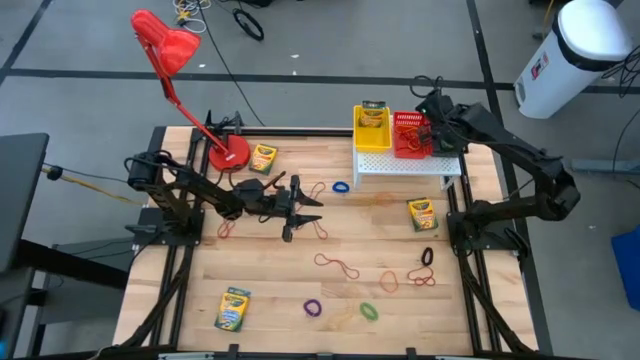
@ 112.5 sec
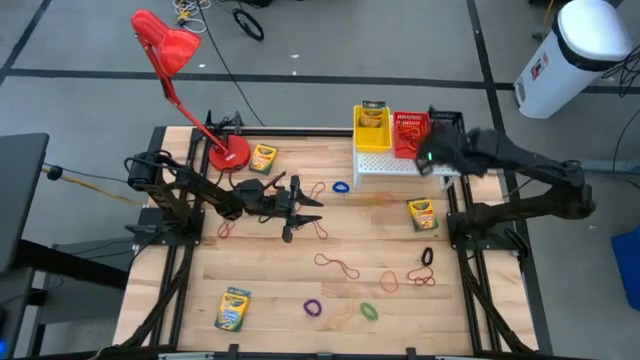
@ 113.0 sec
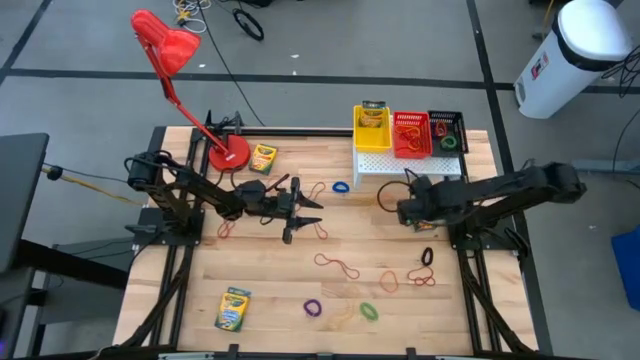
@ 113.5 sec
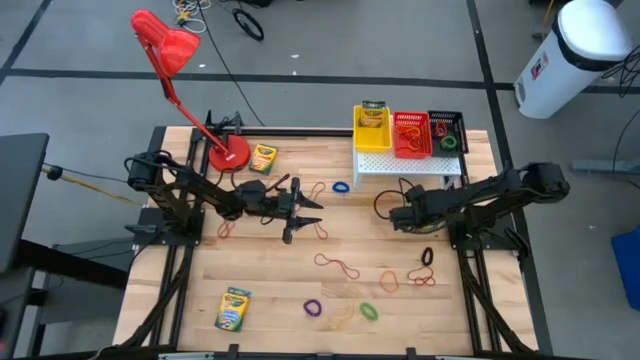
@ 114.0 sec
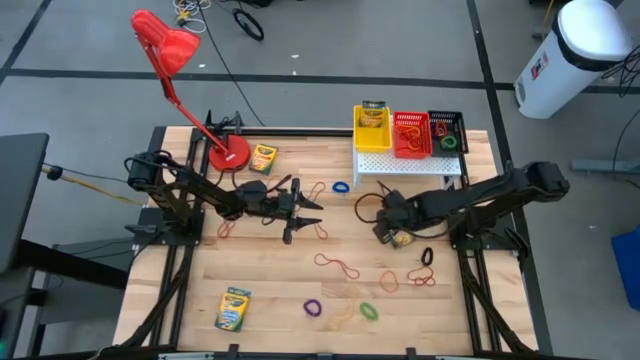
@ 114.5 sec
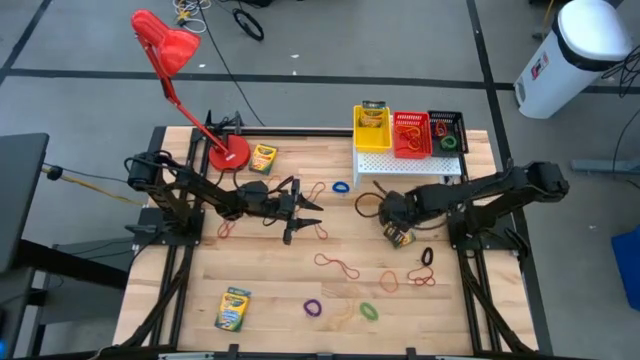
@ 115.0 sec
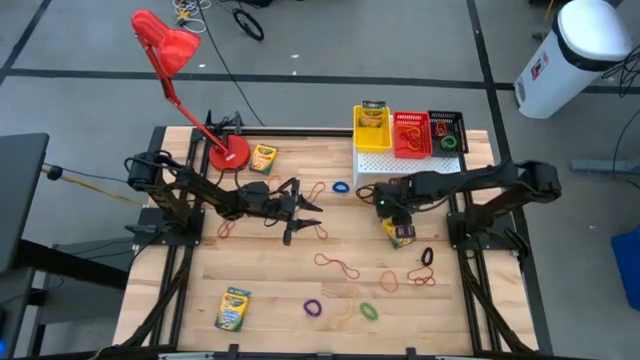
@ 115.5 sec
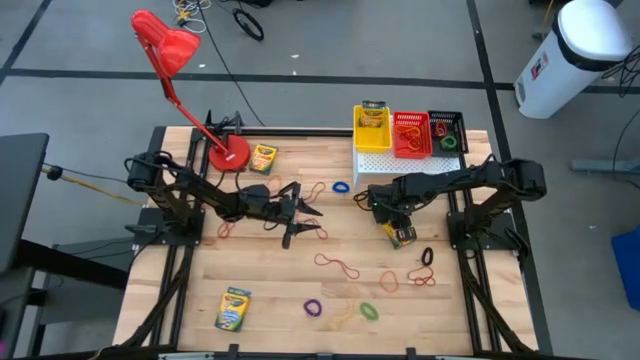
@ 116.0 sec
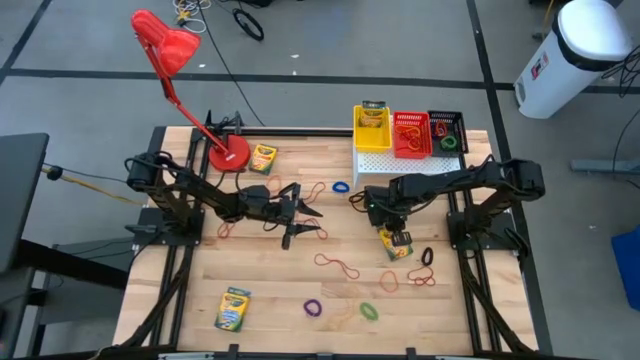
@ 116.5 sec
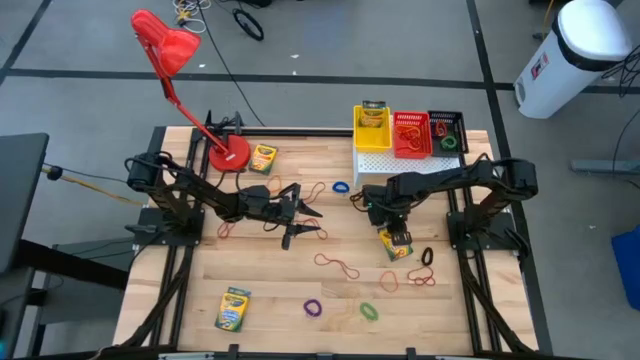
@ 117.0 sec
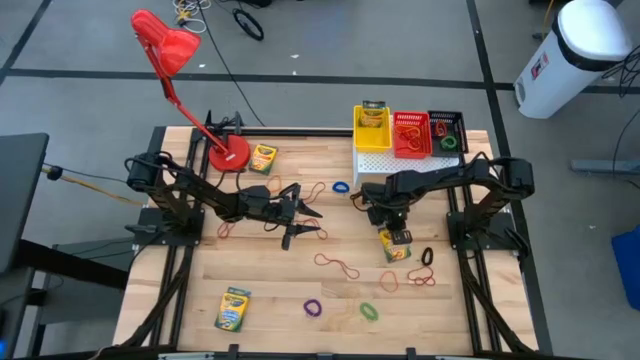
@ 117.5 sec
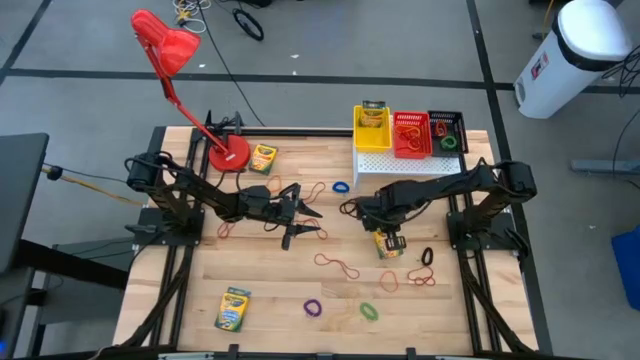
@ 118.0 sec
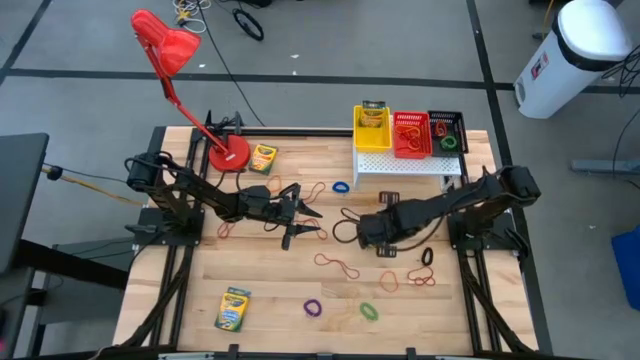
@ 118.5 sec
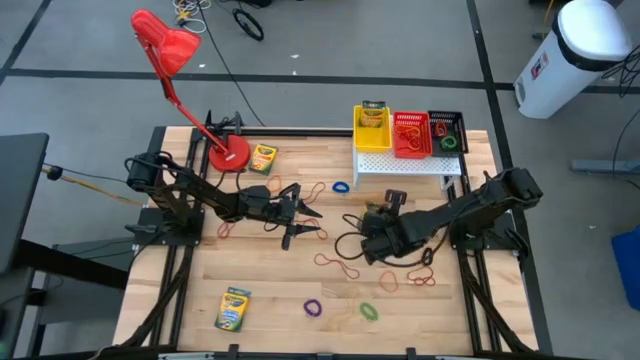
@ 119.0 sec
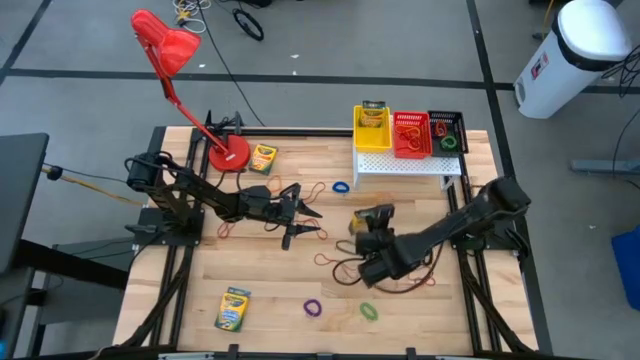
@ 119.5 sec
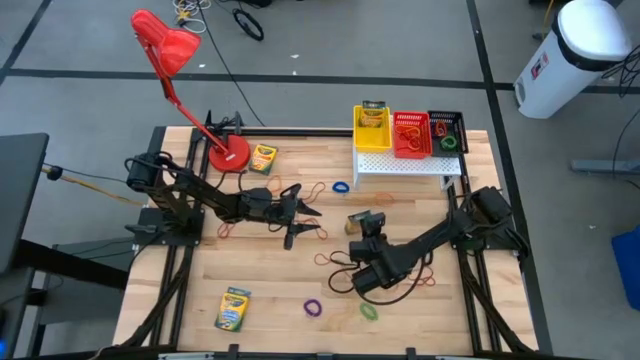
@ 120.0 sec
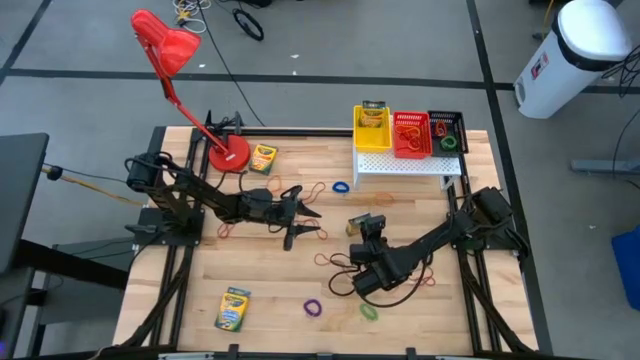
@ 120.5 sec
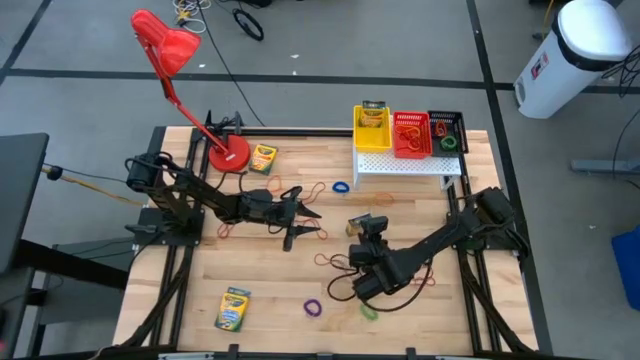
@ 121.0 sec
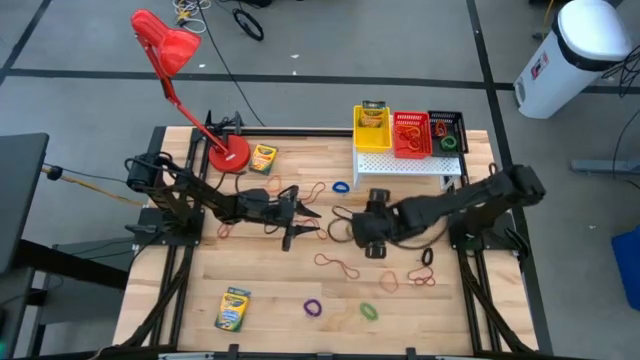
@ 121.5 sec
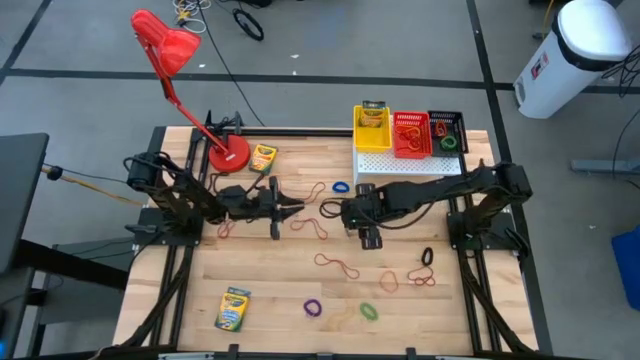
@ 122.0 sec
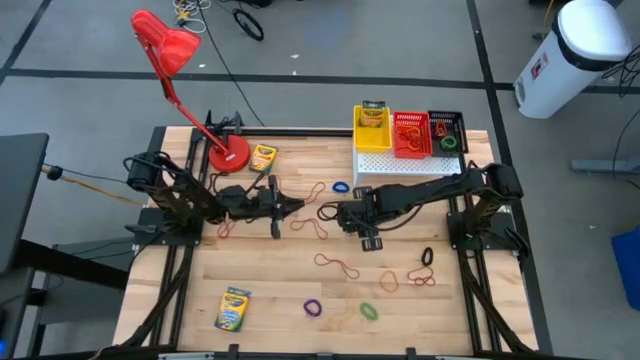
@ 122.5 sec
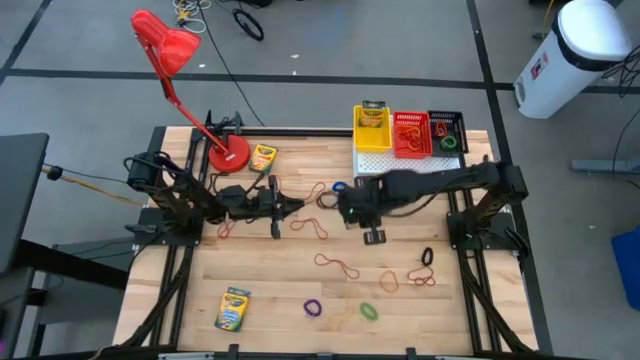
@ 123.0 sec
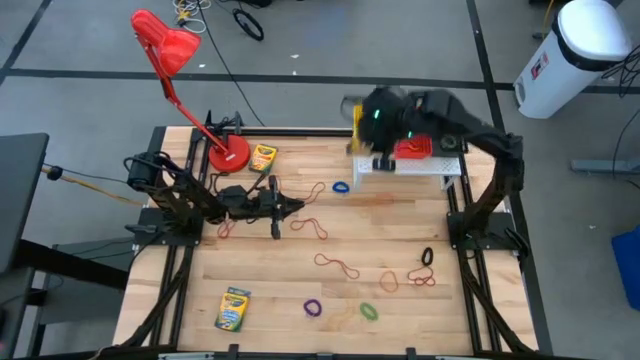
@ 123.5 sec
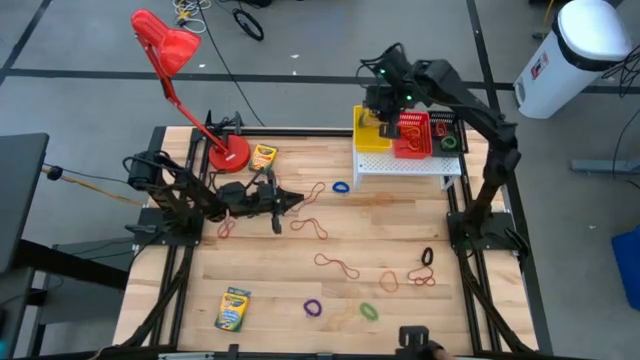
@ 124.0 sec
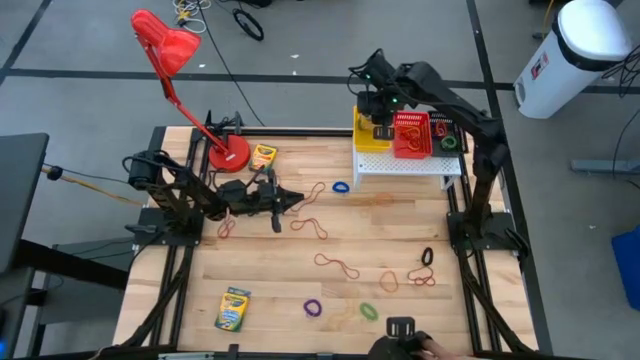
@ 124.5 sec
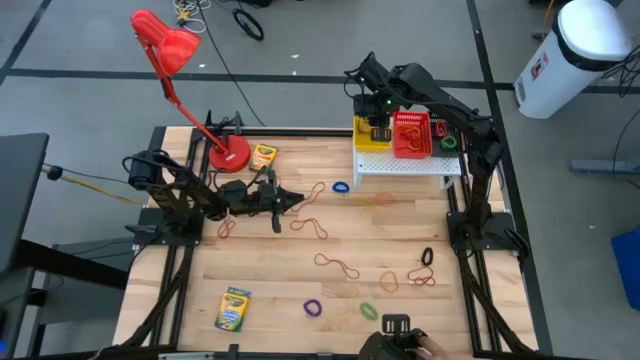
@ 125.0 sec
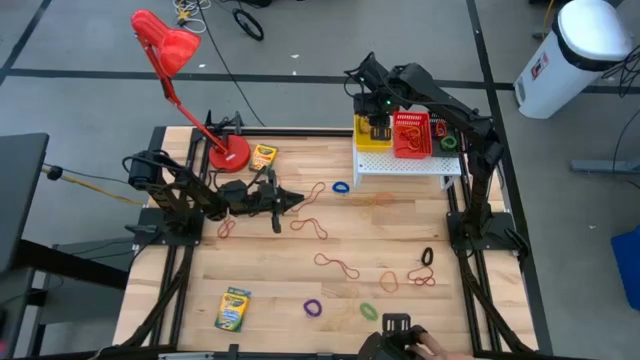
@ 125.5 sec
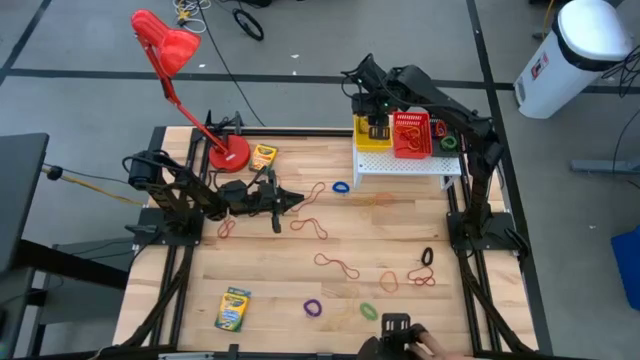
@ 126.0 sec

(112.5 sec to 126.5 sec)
Task: Pick & Place Office Desk Supplies
Put the yellow crayon box on the yellow basket

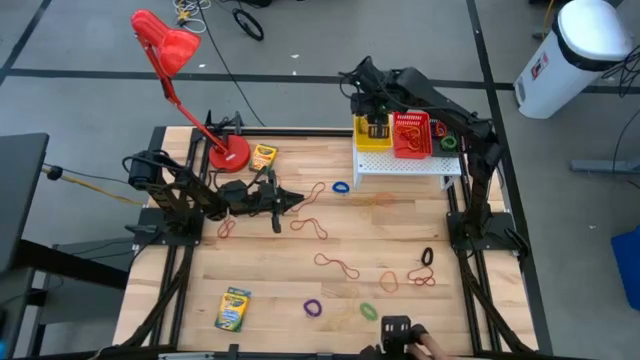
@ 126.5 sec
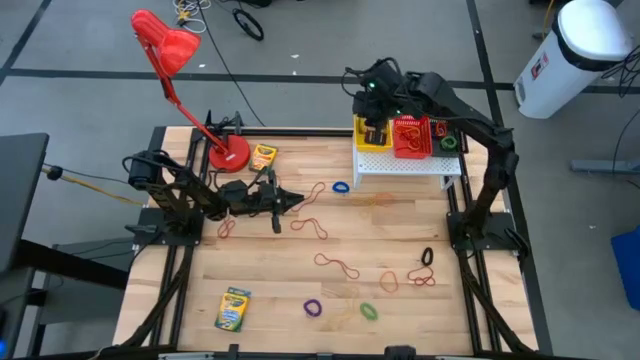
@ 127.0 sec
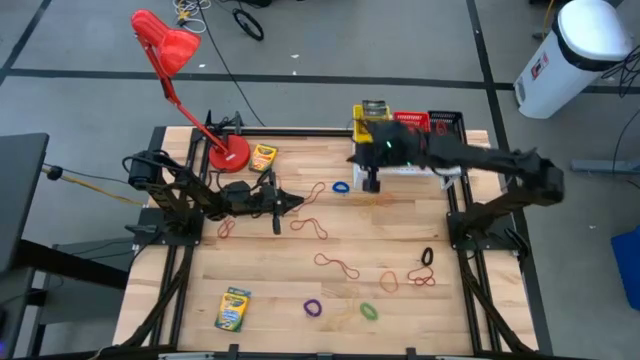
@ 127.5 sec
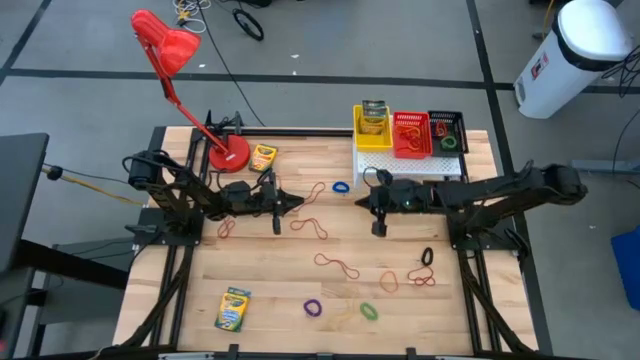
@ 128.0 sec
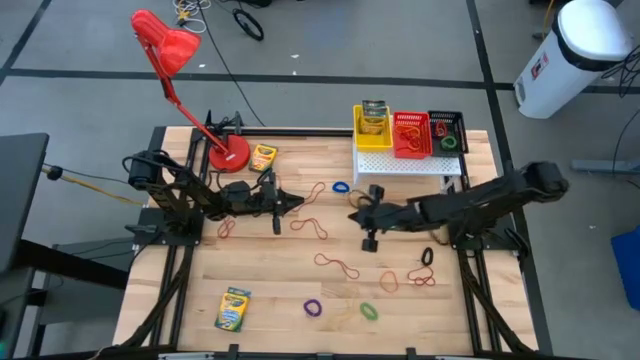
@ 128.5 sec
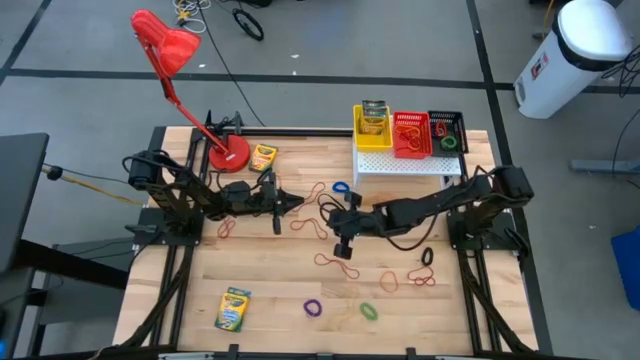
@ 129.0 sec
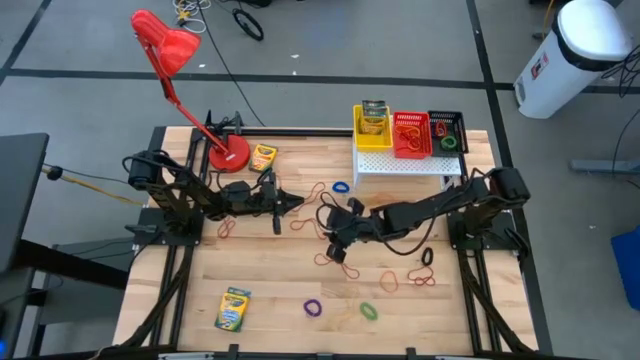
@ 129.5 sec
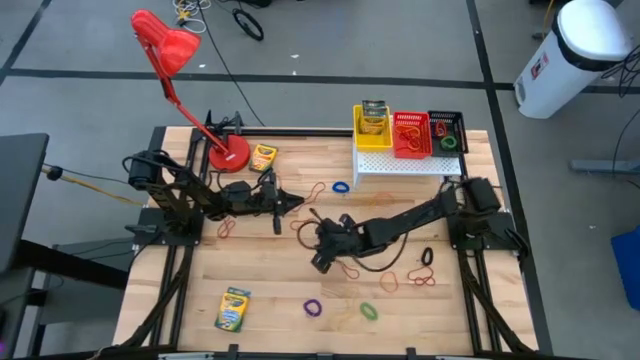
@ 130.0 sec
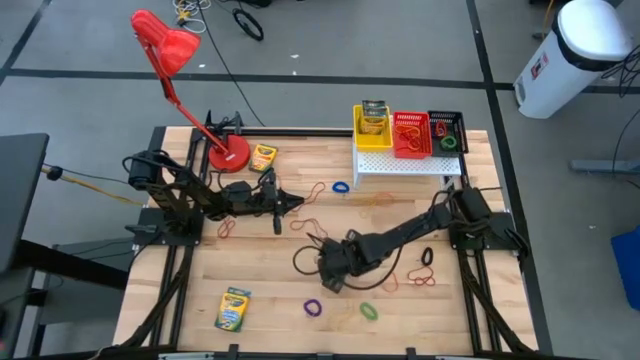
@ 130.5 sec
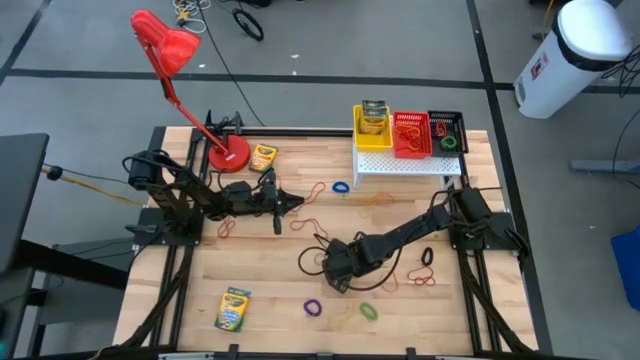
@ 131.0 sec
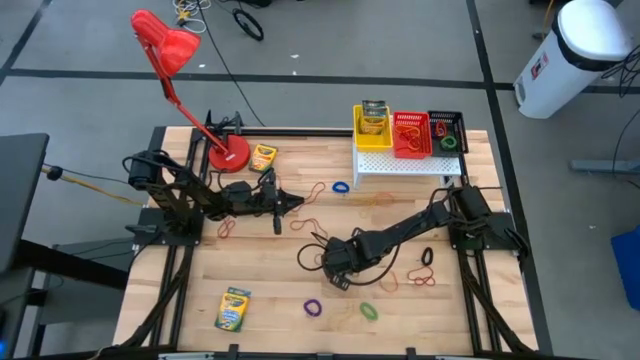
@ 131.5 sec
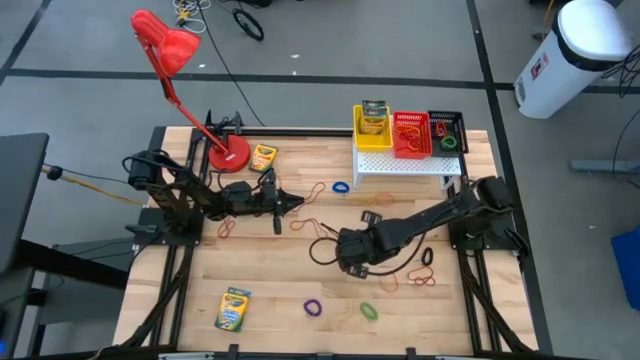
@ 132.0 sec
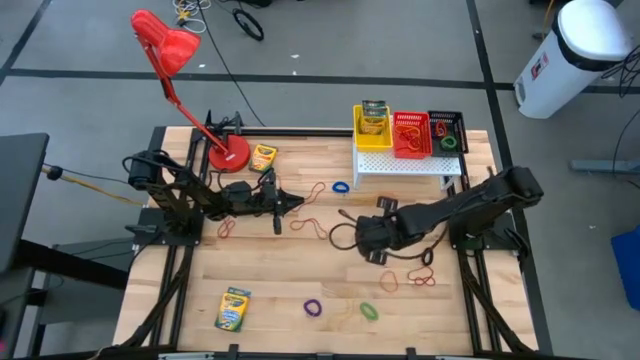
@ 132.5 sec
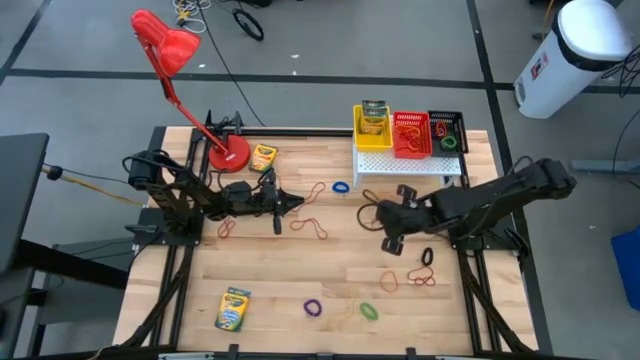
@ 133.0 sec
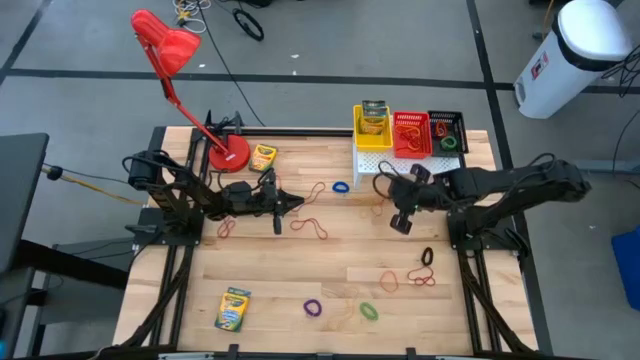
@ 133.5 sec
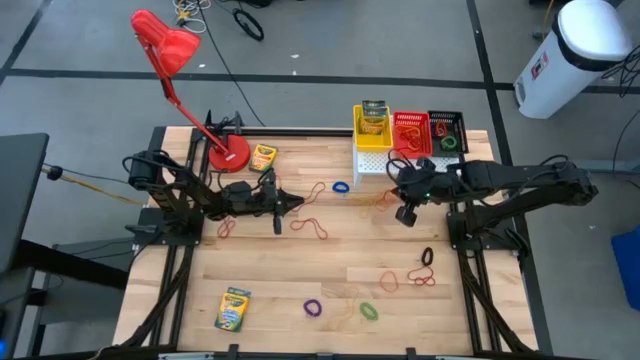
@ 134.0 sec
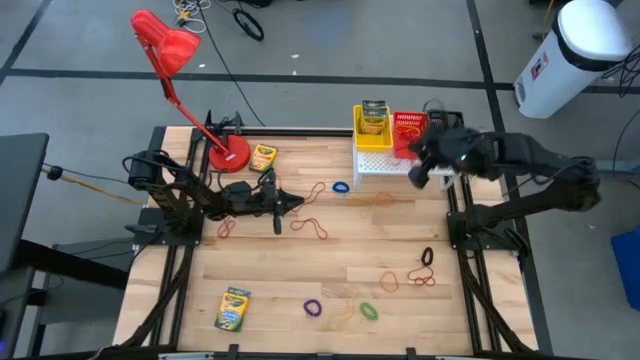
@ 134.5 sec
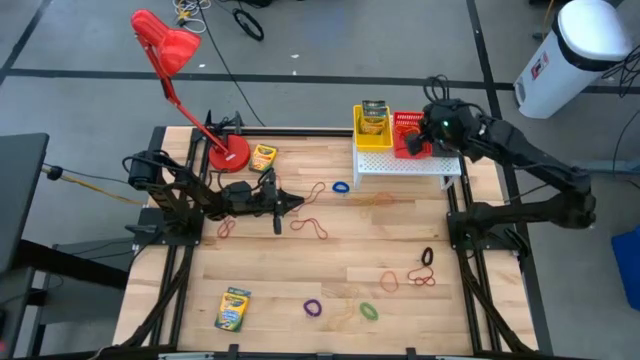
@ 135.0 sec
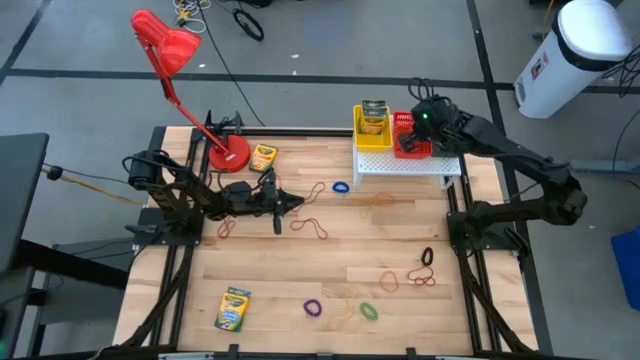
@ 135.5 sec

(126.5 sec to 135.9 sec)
Put the red rubber band on the red basket
